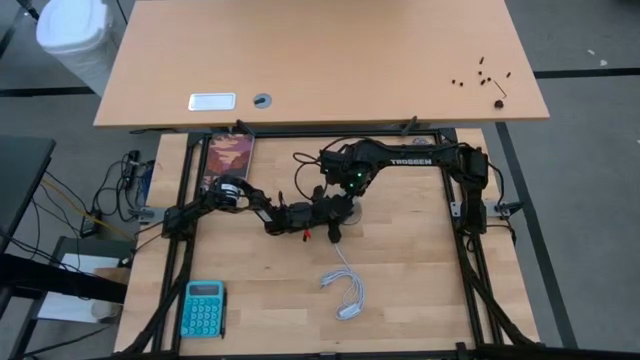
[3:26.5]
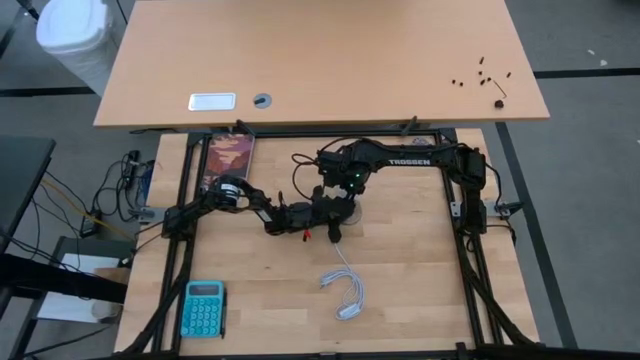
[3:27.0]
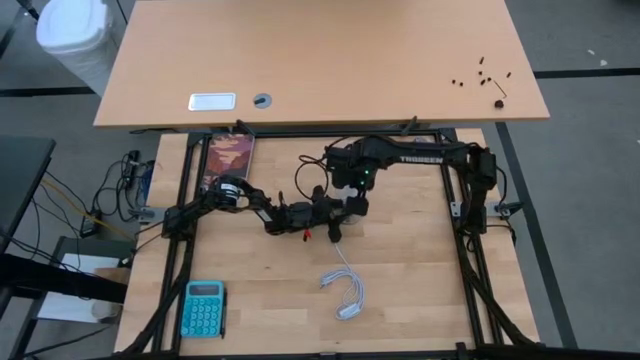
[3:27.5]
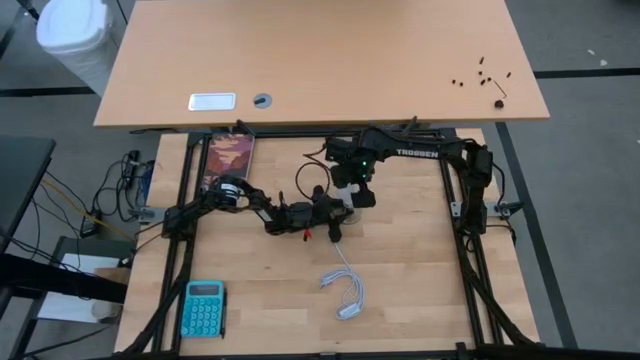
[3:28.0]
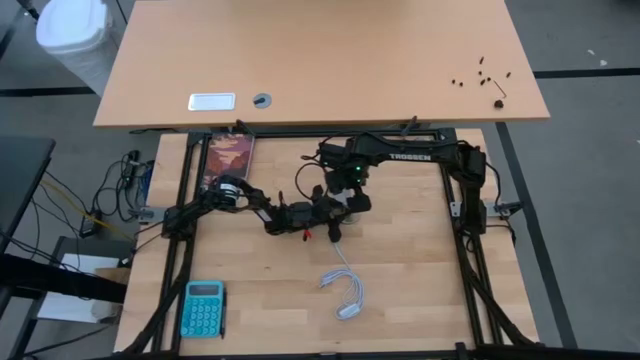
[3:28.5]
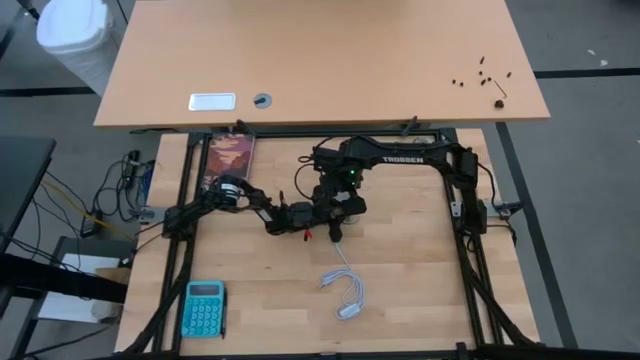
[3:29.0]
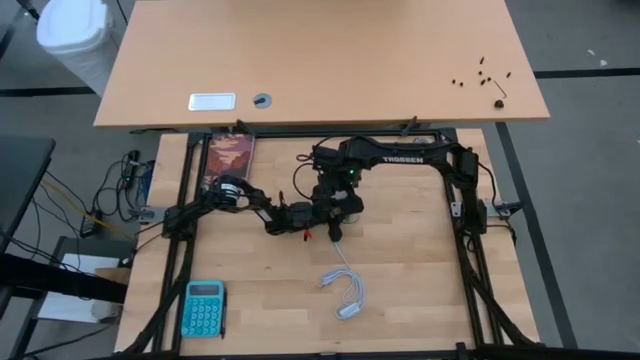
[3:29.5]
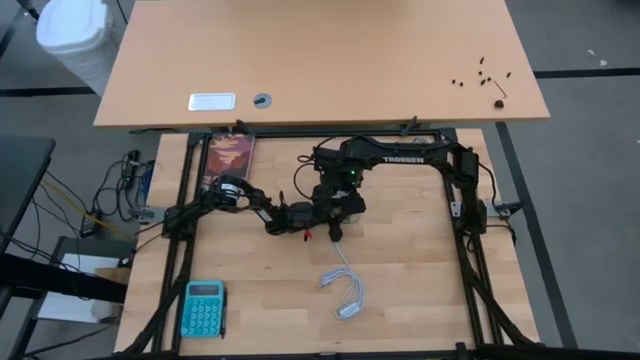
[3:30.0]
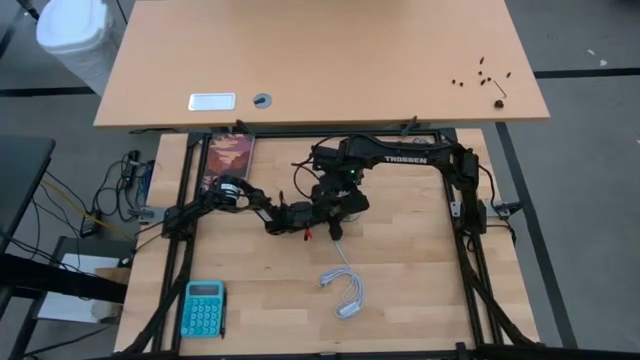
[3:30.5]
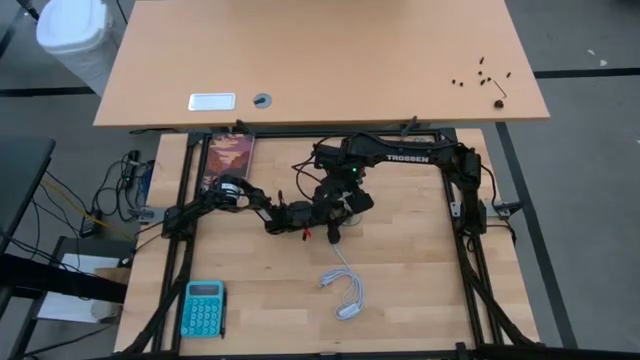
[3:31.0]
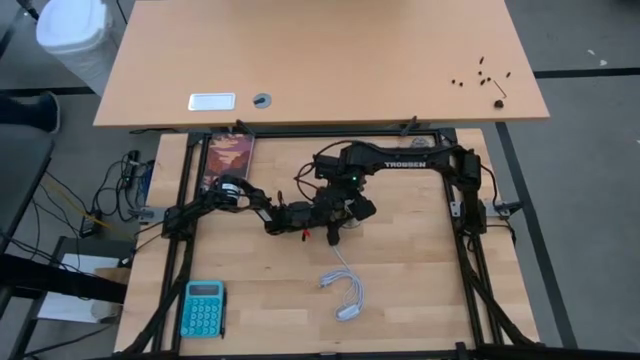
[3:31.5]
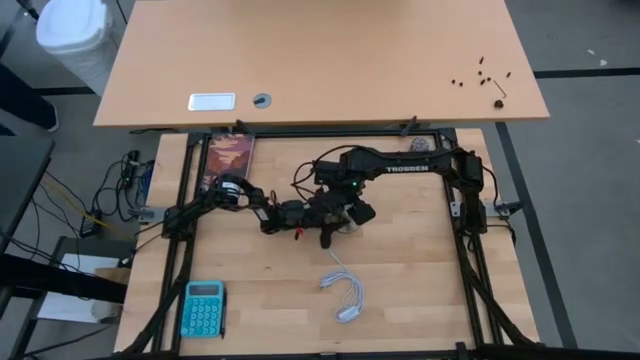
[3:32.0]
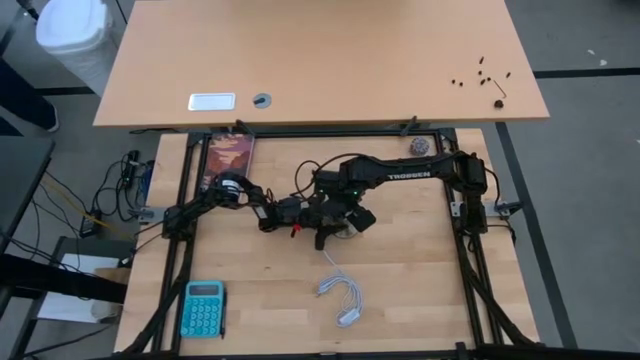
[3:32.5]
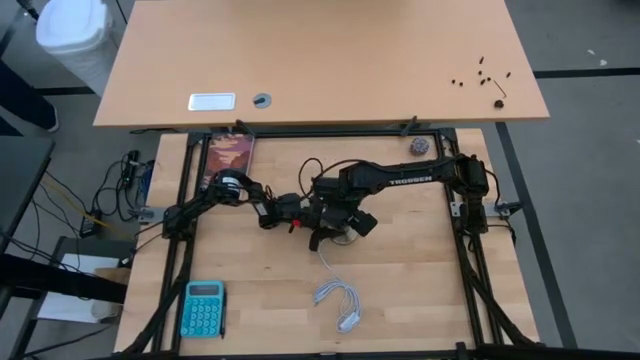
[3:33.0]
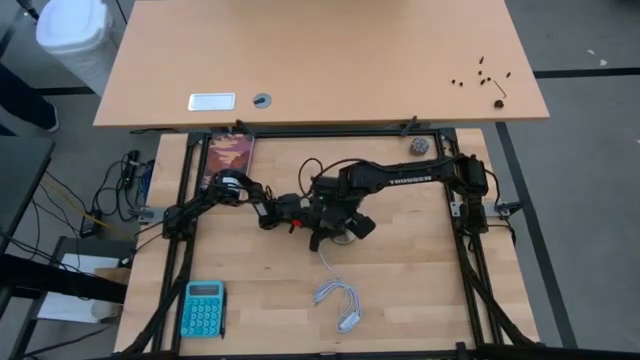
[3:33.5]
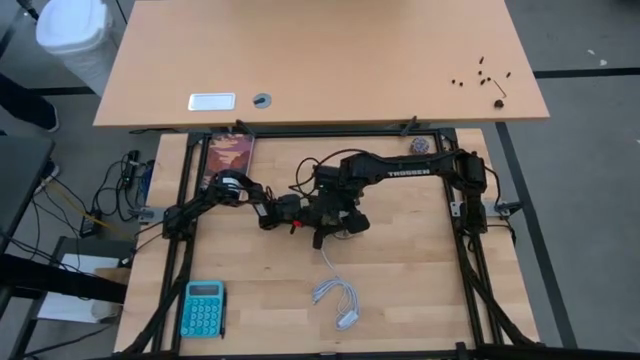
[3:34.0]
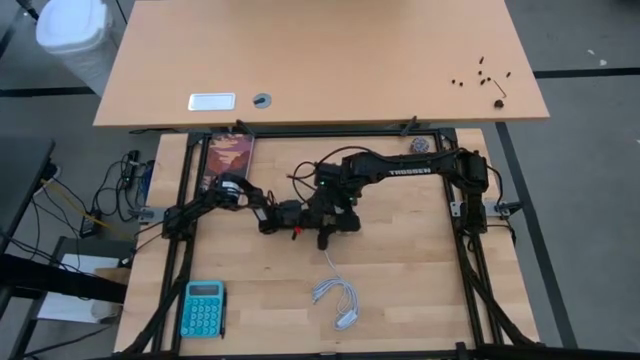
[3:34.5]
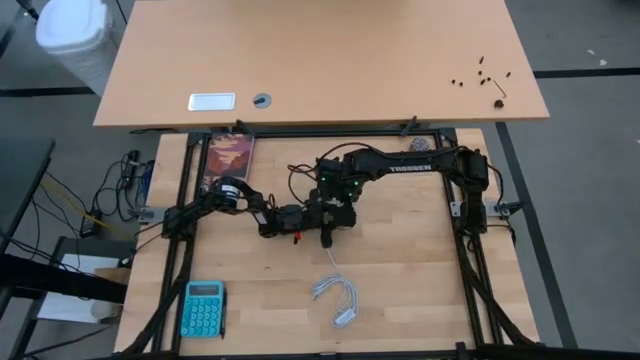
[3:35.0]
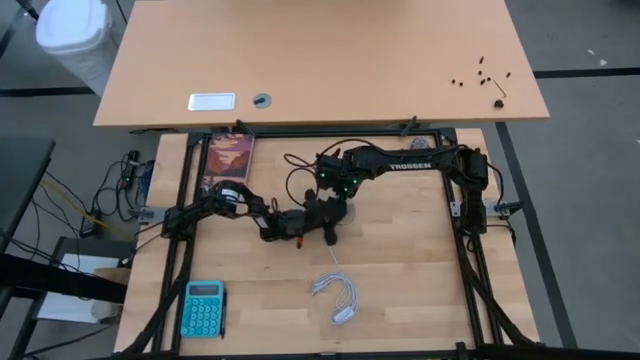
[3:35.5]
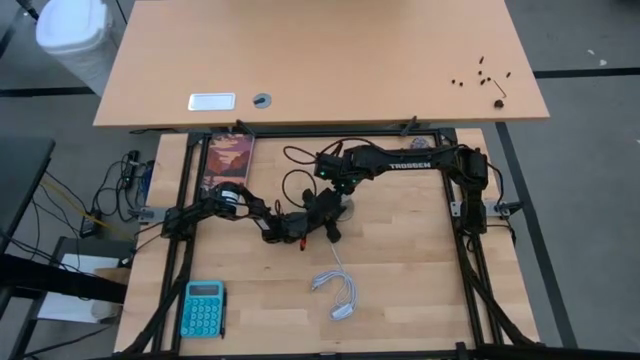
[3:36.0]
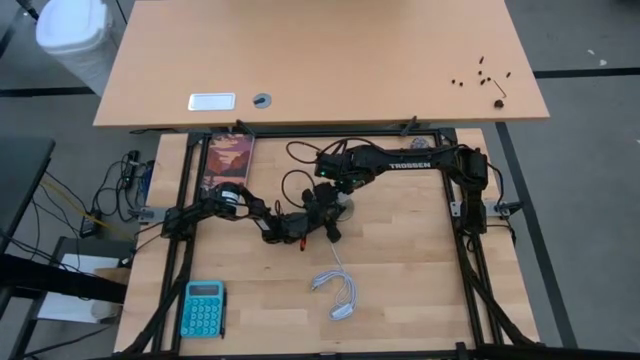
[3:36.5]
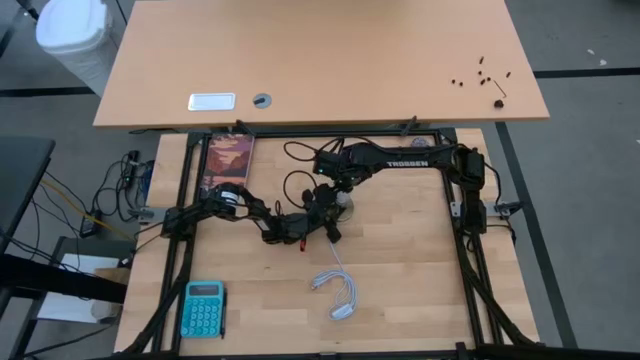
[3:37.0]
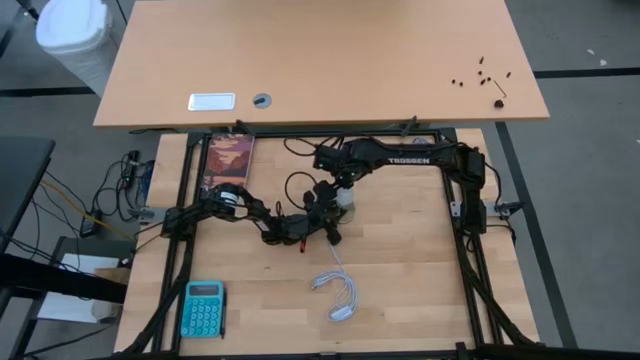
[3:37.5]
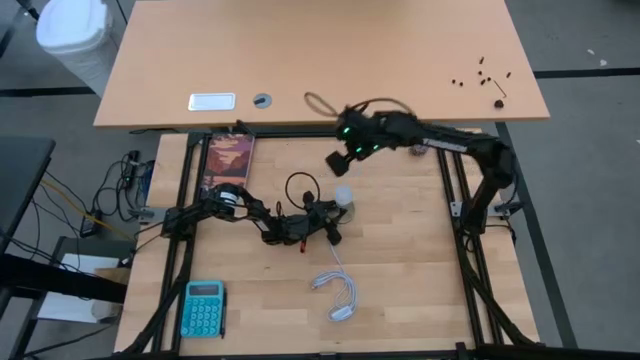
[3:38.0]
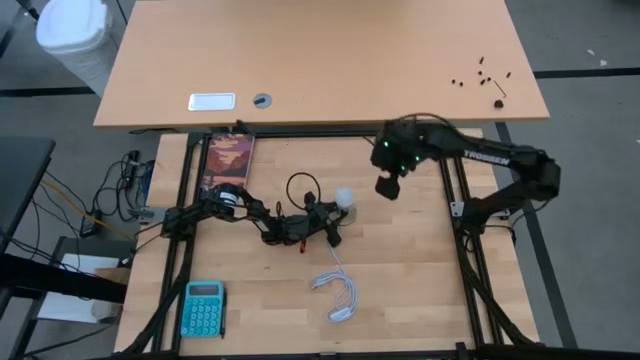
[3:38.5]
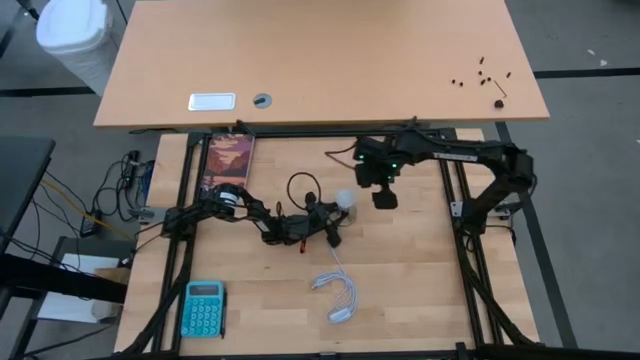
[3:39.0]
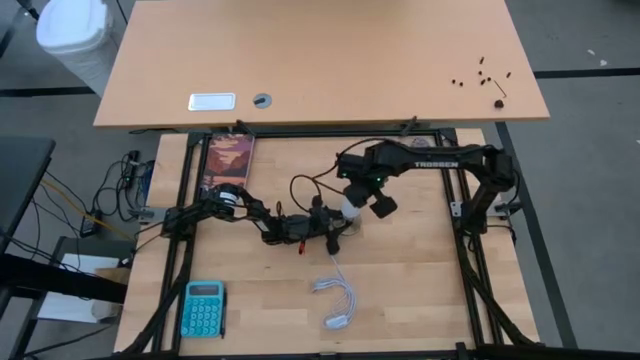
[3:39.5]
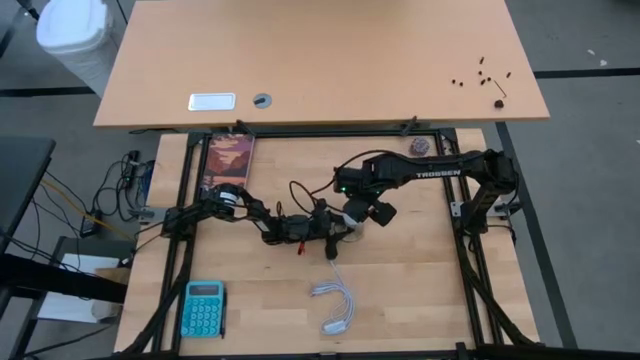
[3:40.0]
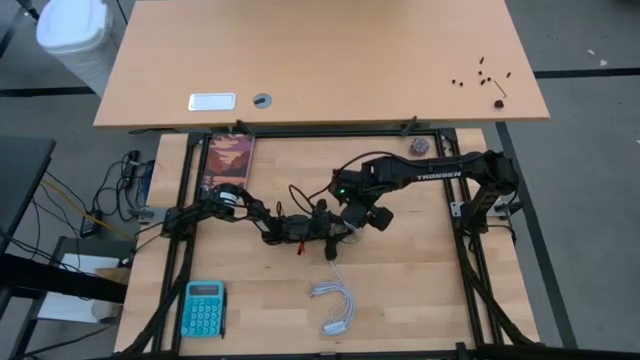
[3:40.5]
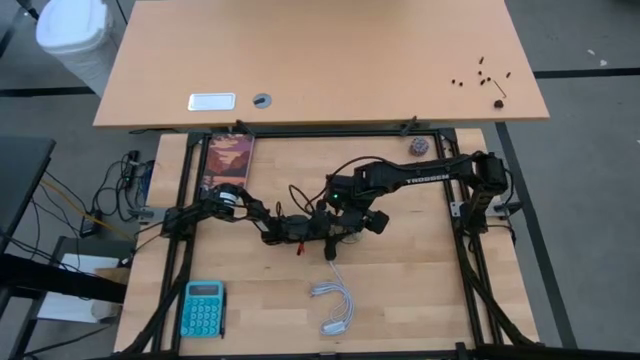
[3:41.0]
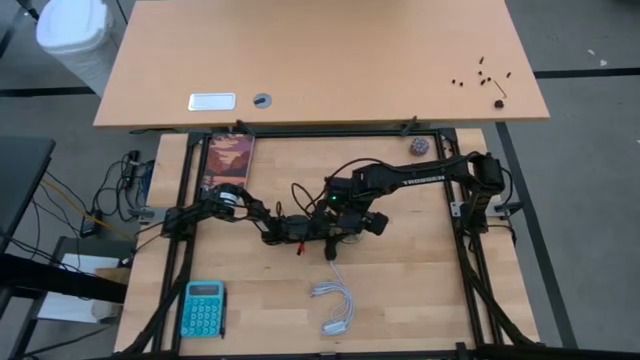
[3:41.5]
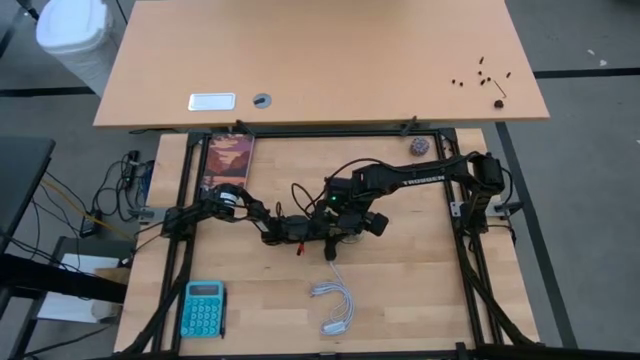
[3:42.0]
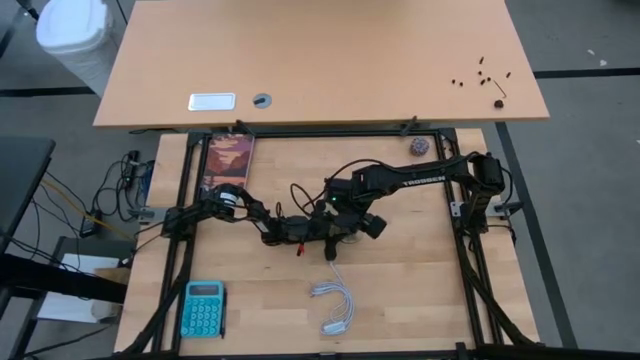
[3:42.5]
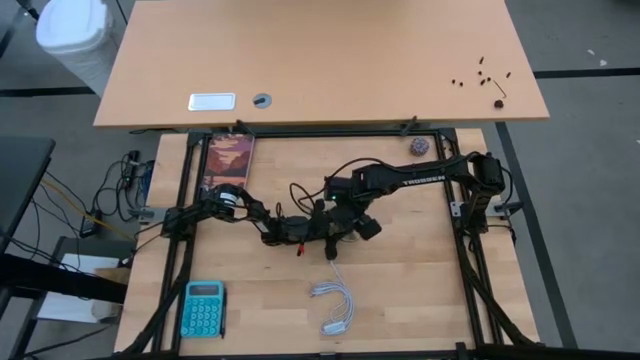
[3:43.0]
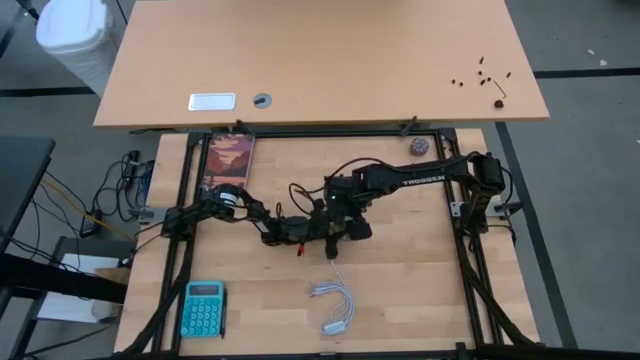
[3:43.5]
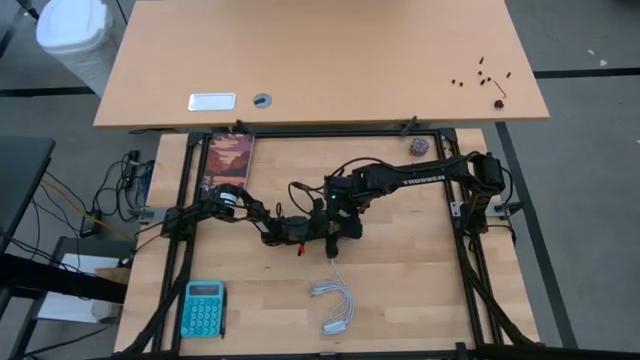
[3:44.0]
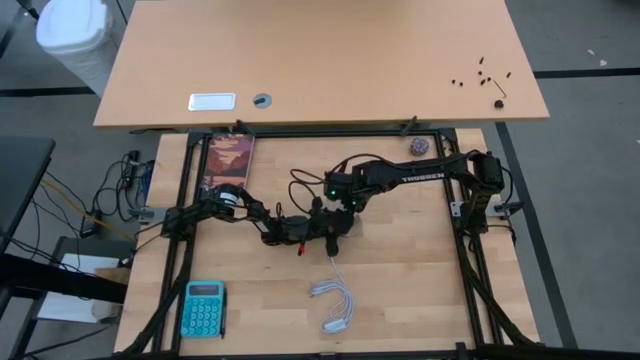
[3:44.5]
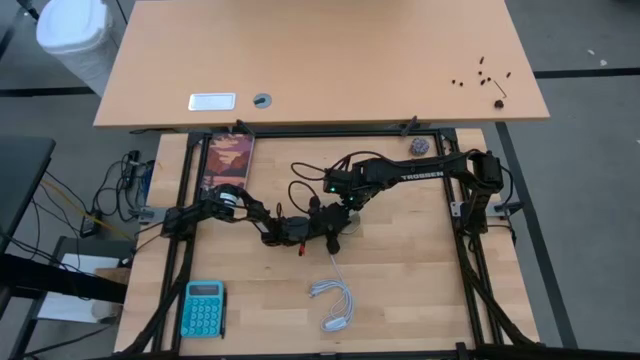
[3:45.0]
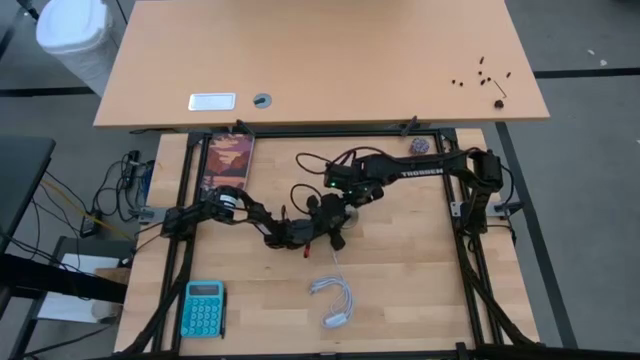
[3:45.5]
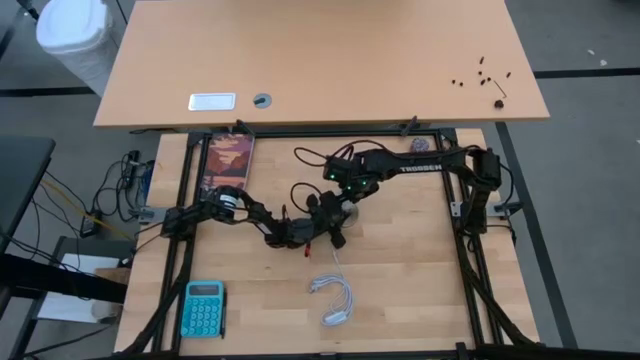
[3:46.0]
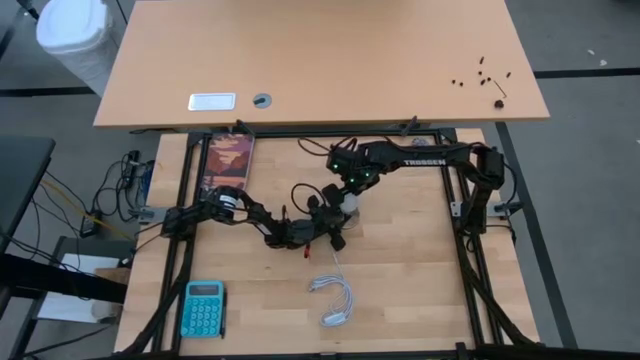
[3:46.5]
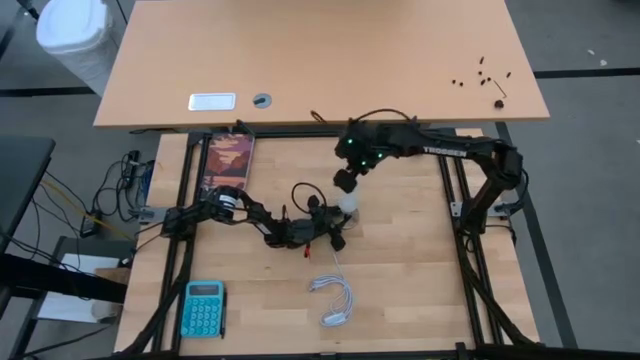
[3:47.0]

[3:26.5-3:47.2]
Task: Screw lightbulb
Insert the lightbulb into the desk lamp
